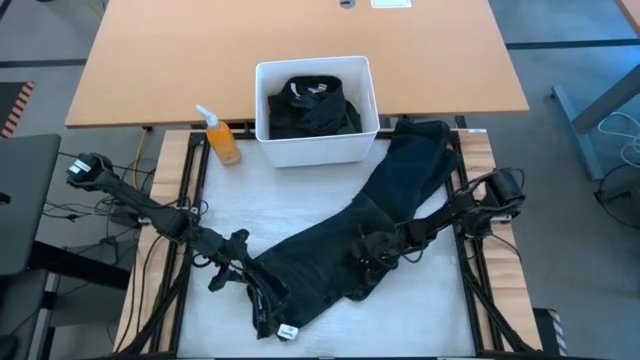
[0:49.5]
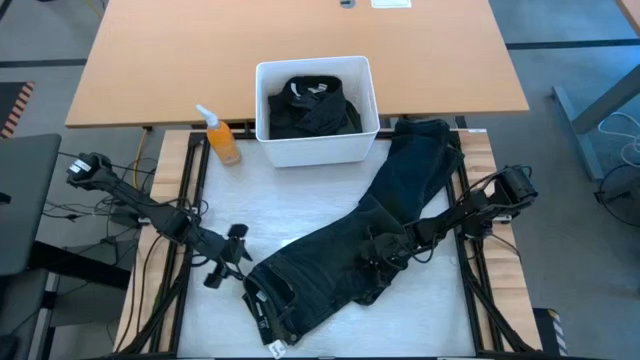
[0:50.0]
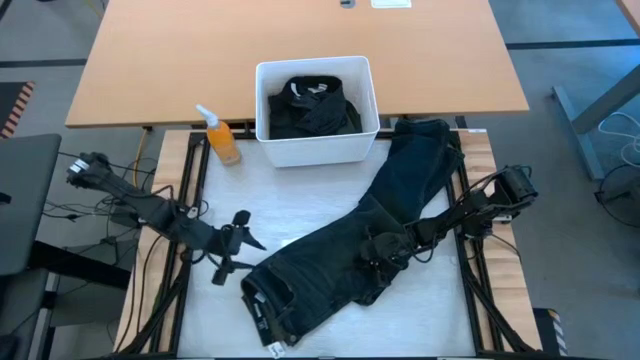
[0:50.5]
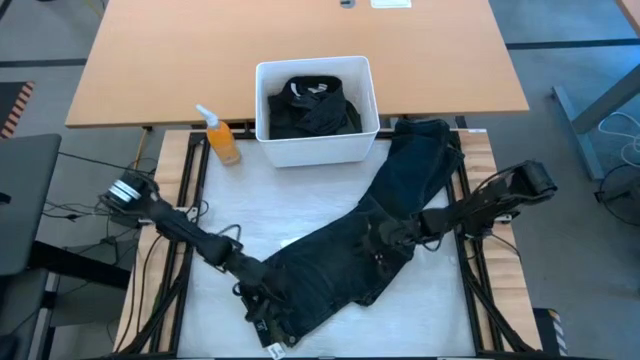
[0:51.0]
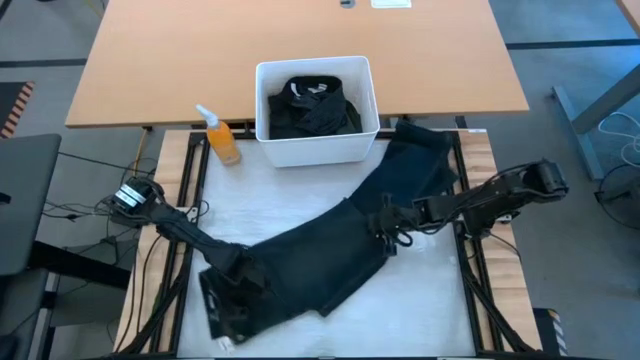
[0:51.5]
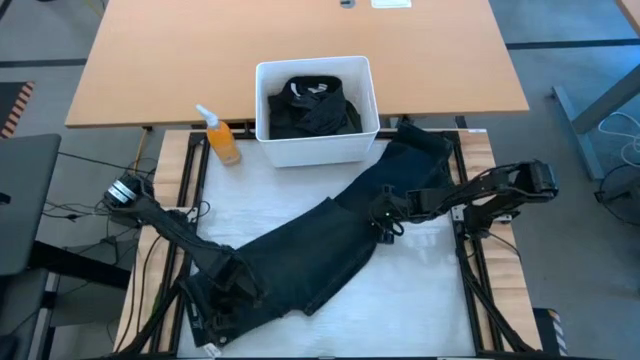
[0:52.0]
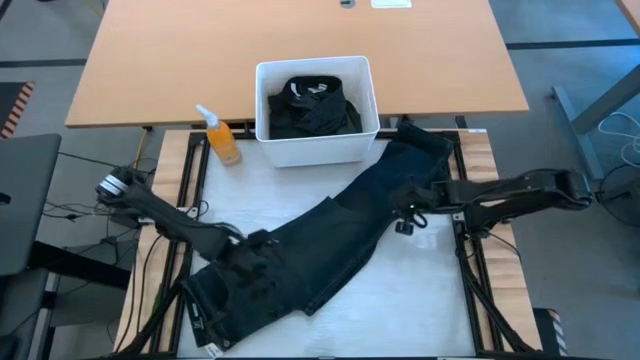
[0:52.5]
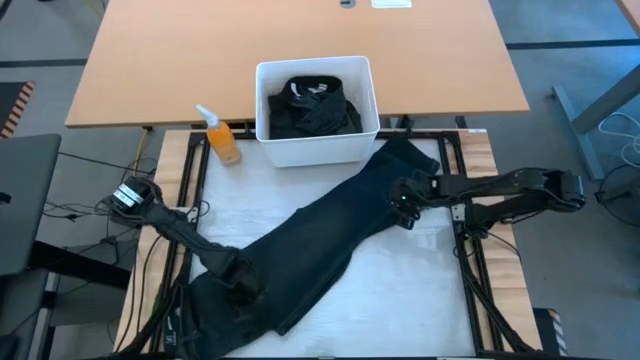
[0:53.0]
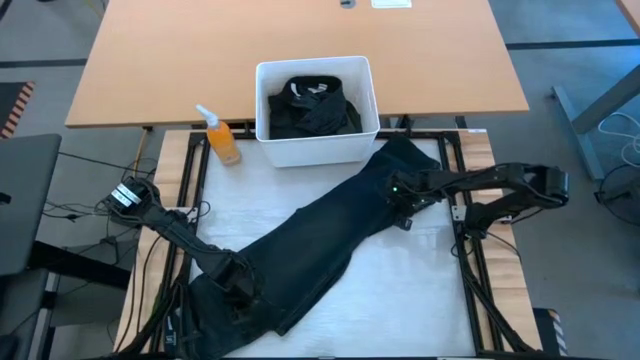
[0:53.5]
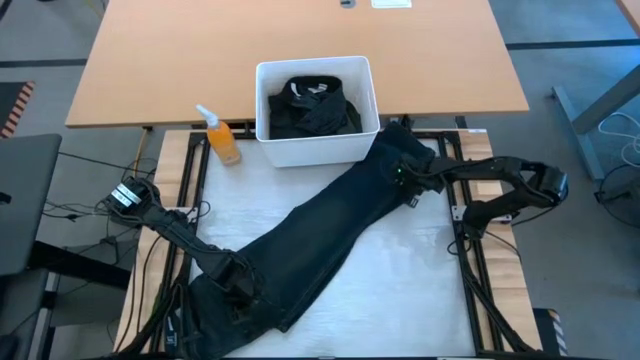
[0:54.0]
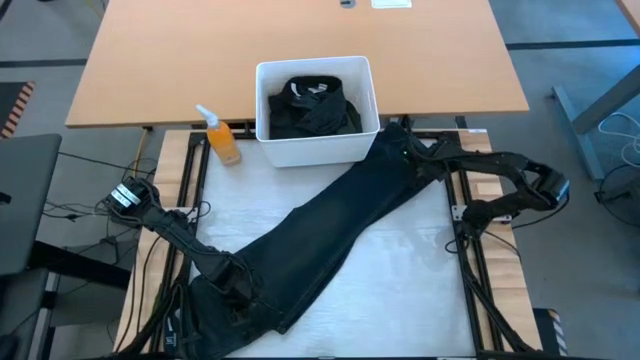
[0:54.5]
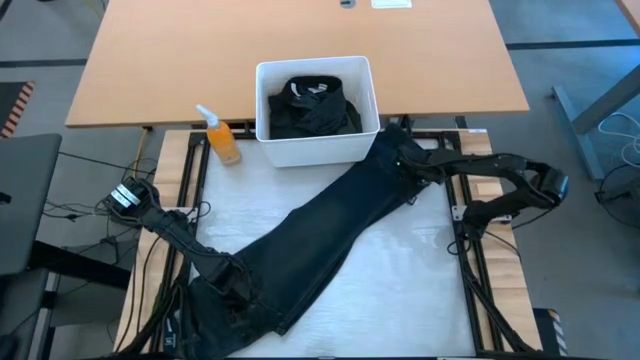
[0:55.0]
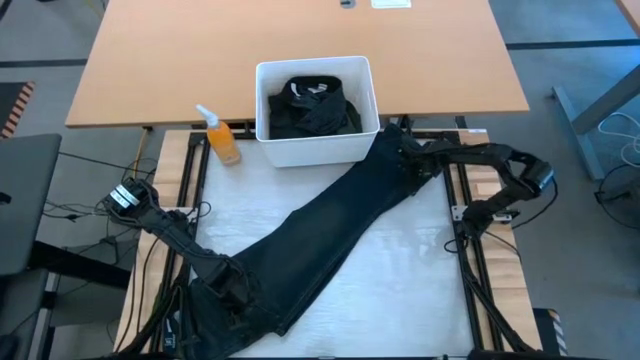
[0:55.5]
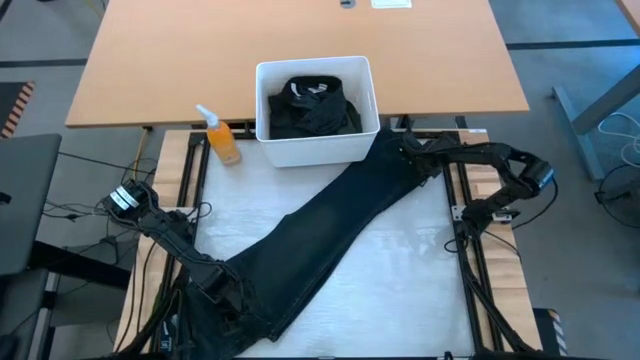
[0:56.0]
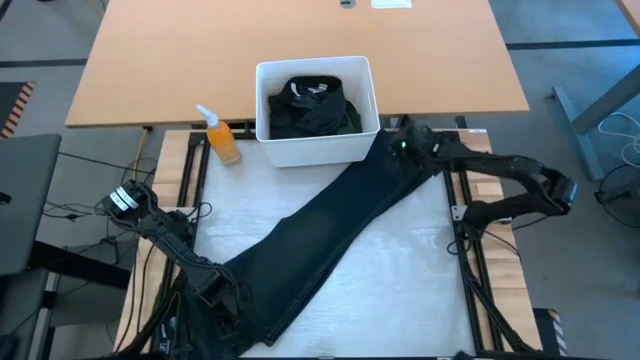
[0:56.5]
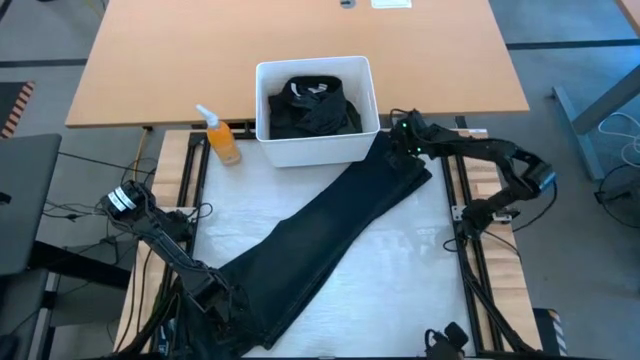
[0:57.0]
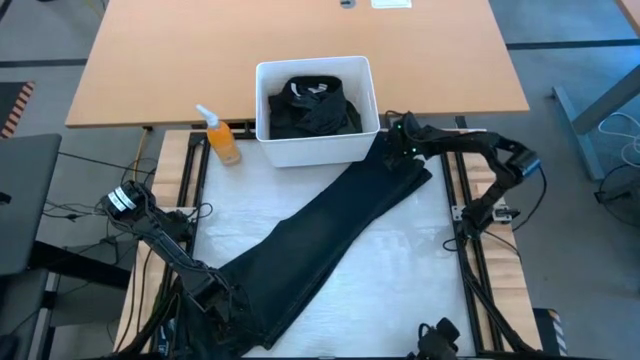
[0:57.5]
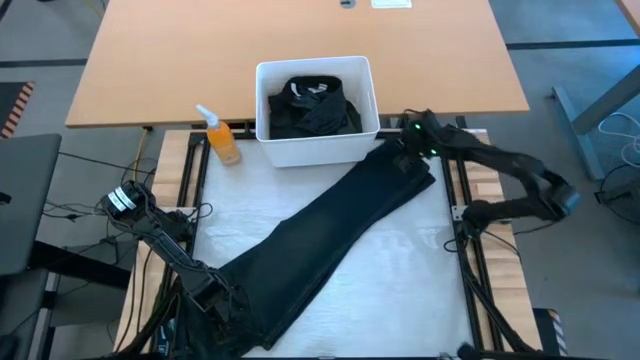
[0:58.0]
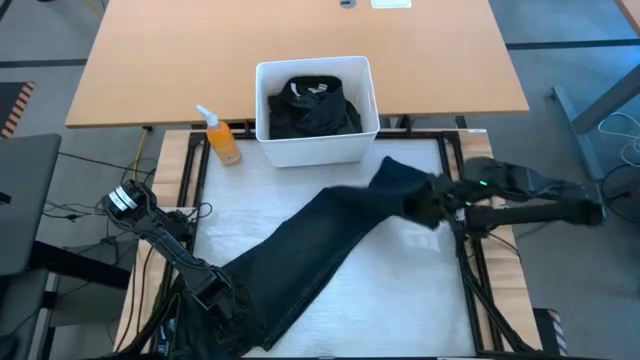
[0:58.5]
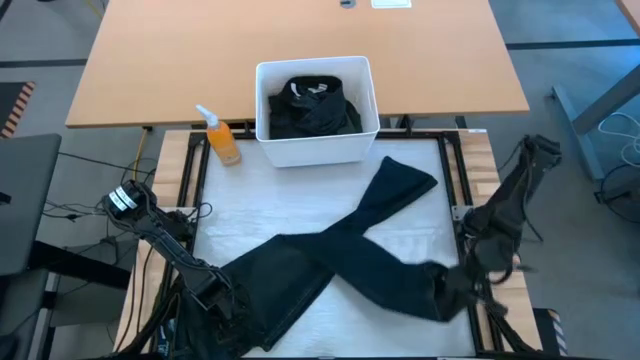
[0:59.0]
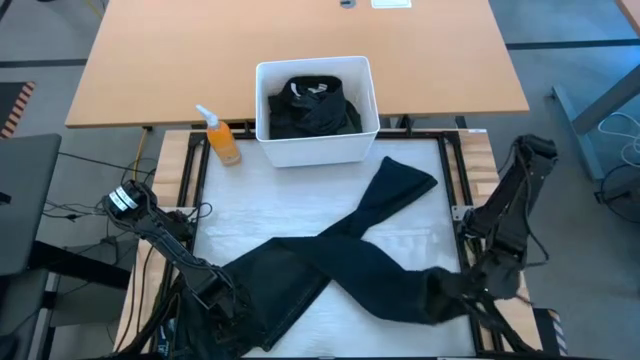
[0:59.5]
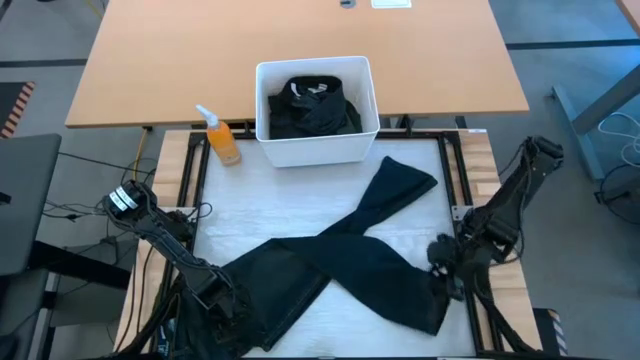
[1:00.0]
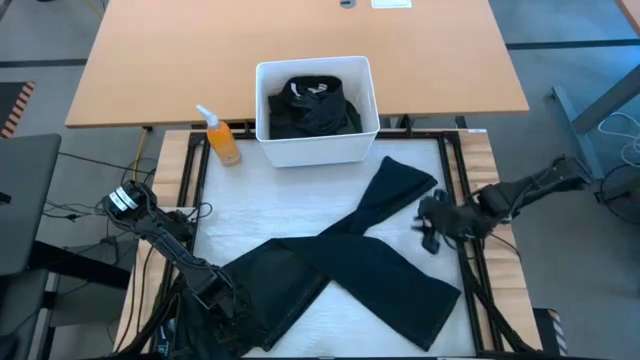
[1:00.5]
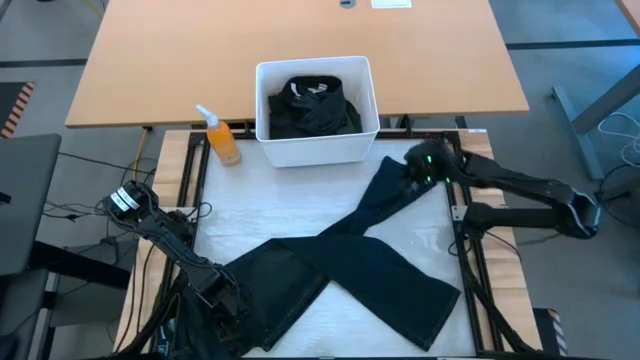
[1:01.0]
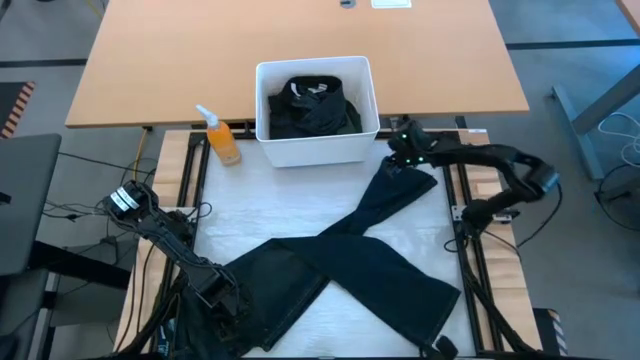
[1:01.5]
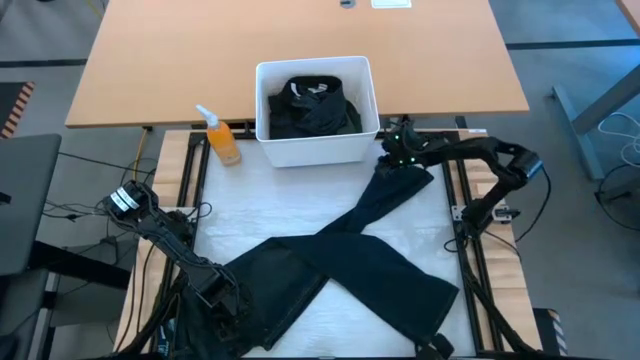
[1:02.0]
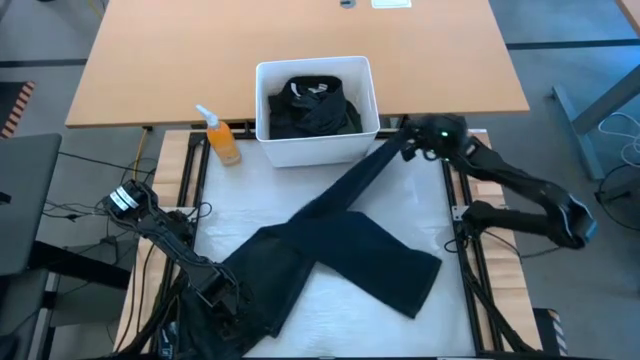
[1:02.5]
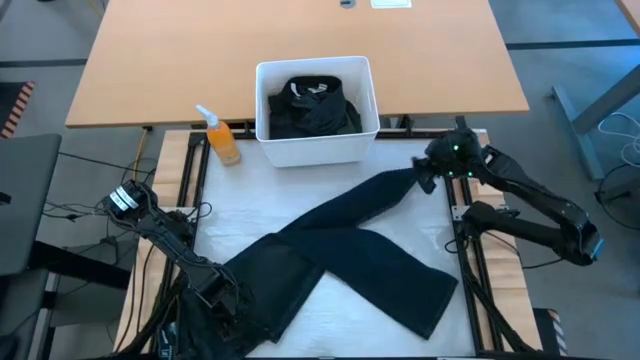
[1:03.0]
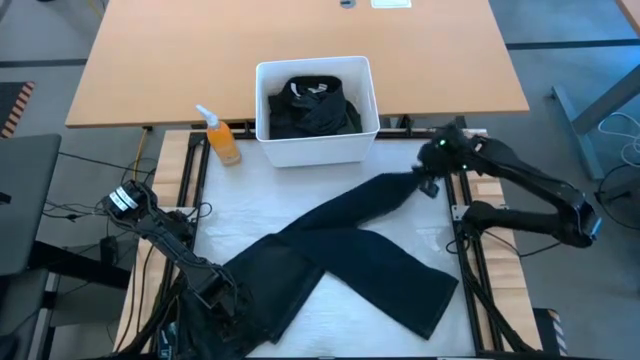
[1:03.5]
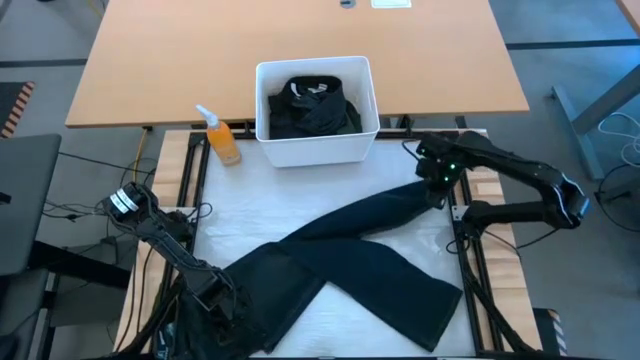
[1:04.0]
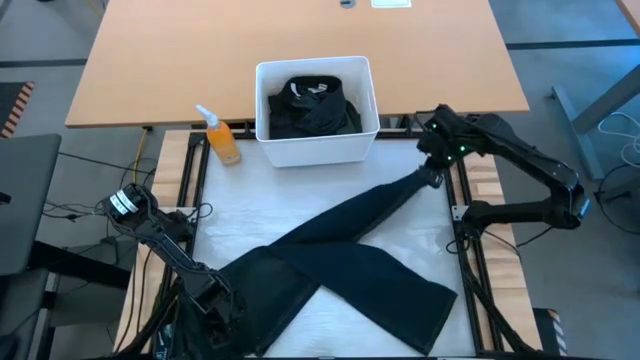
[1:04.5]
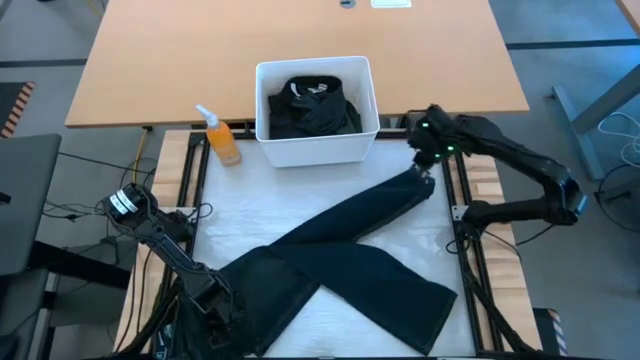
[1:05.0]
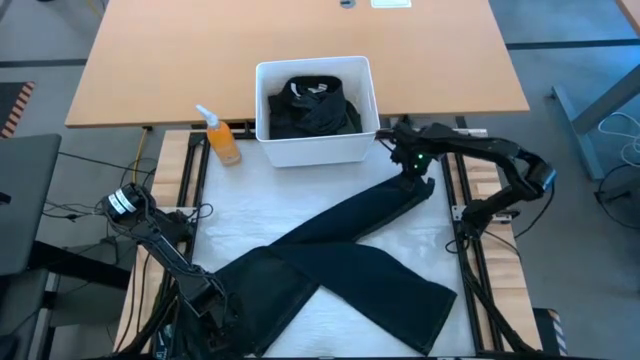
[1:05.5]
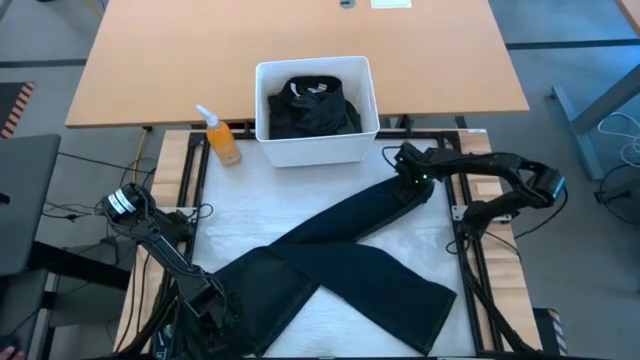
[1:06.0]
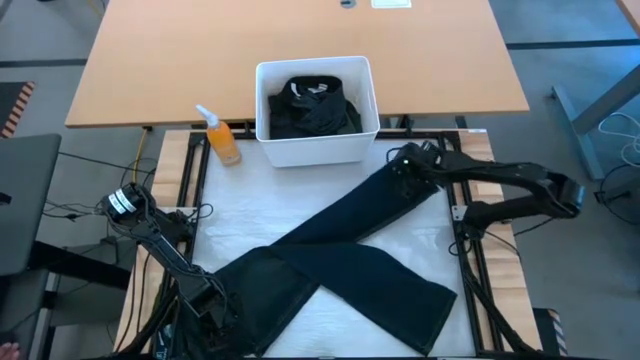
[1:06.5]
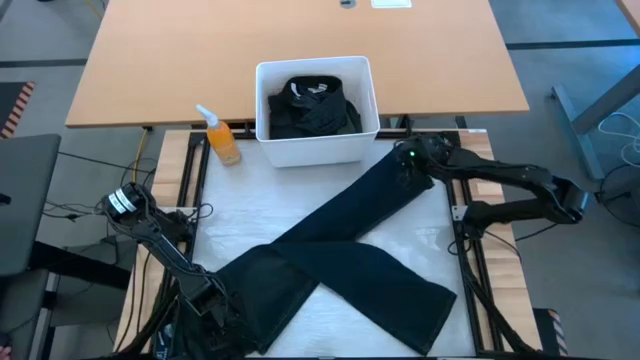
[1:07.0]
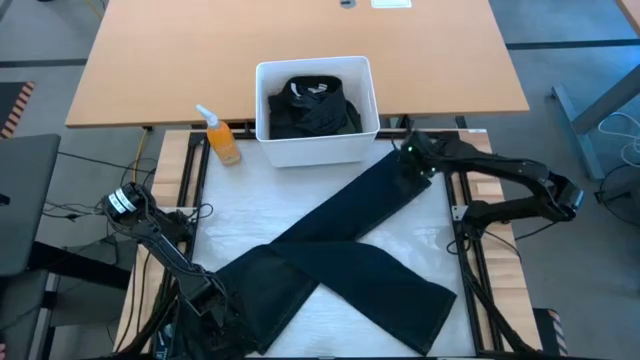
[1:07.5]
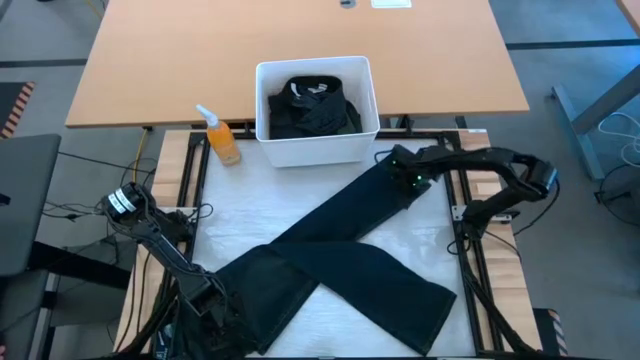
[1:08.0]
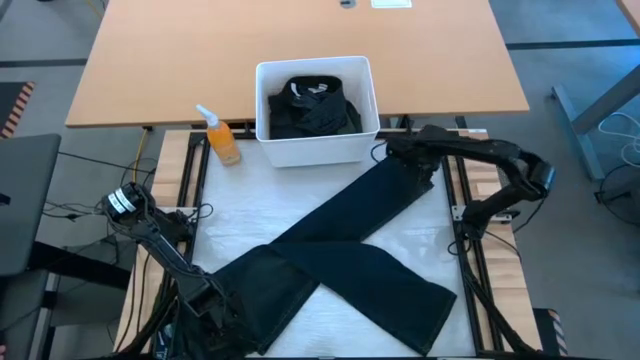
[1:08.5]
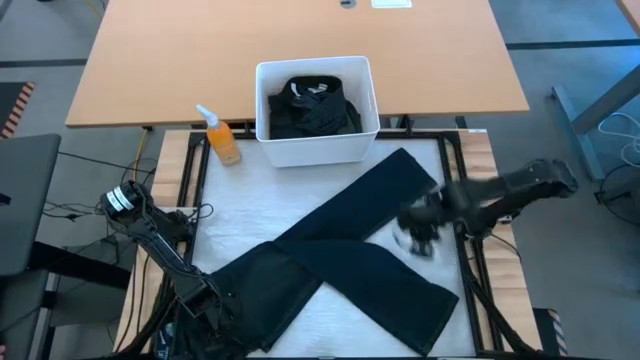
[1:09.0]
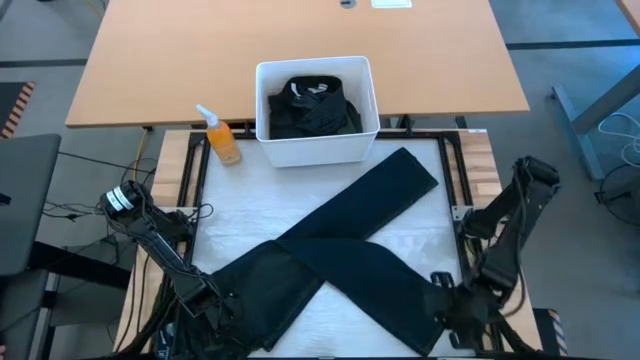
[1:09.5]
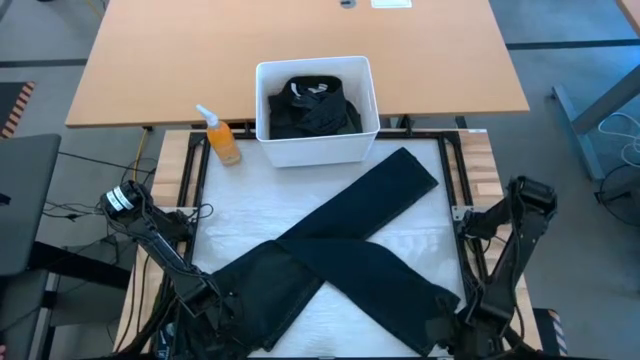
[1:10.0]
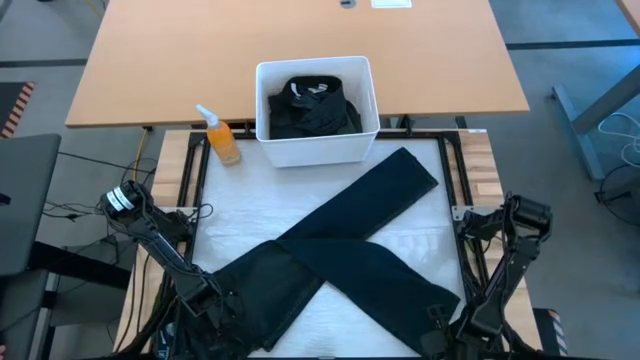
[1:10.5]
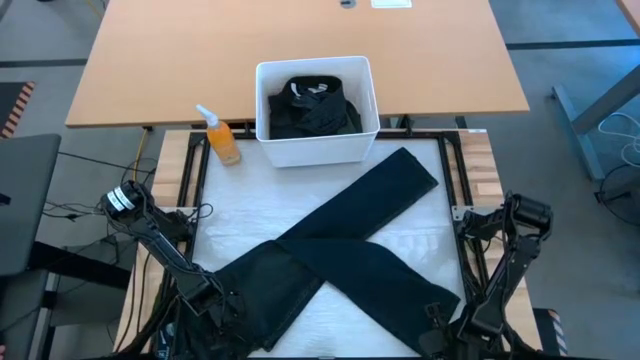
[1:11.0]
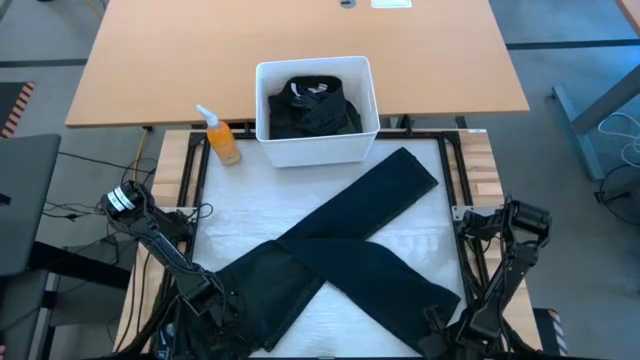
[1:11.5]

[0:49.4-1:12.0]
Task: Fold laundry
Fold the dark blue jeans from the white laundry organizer
